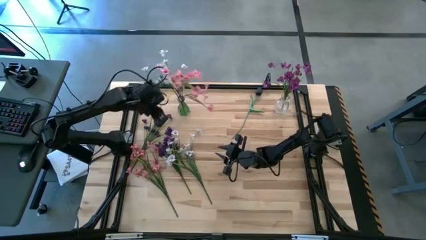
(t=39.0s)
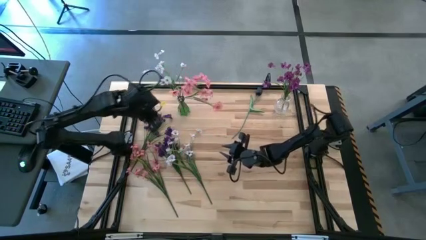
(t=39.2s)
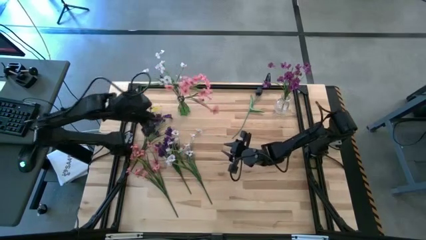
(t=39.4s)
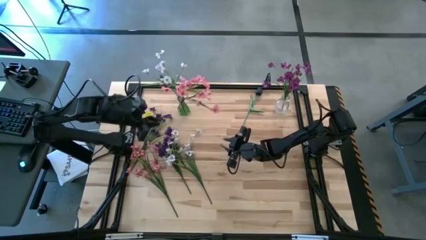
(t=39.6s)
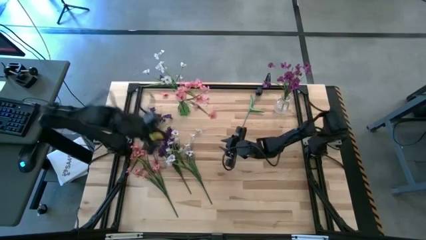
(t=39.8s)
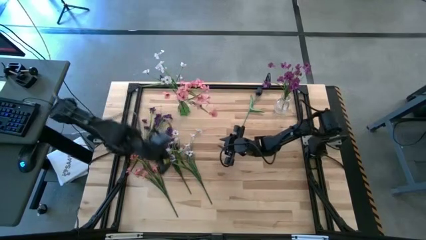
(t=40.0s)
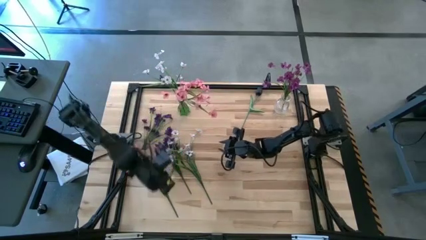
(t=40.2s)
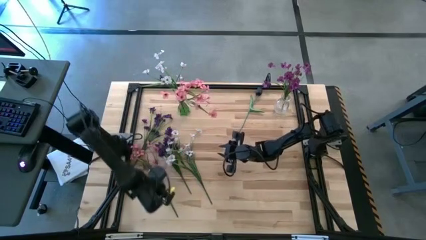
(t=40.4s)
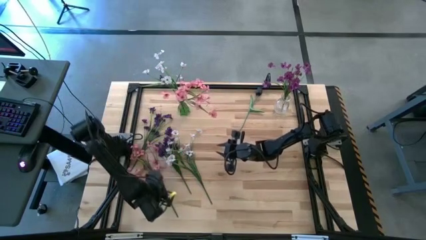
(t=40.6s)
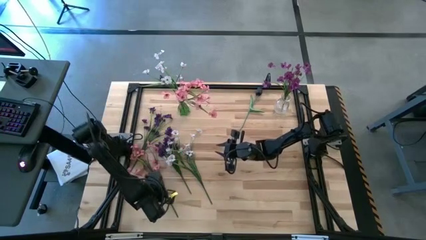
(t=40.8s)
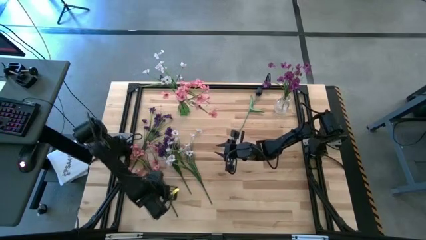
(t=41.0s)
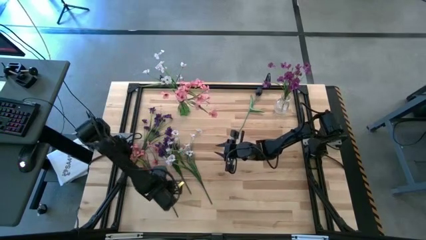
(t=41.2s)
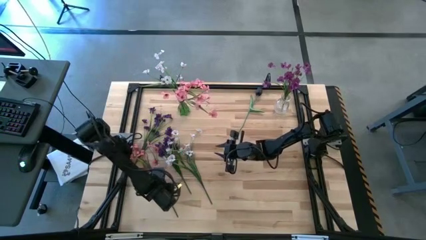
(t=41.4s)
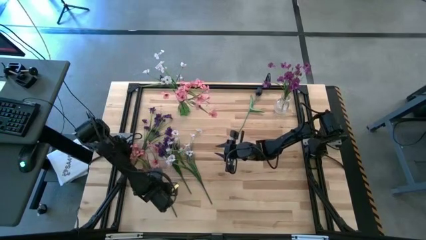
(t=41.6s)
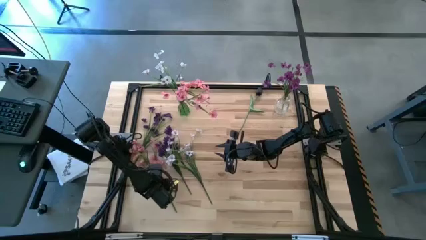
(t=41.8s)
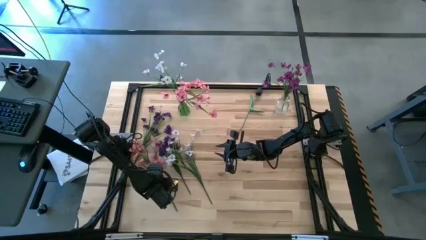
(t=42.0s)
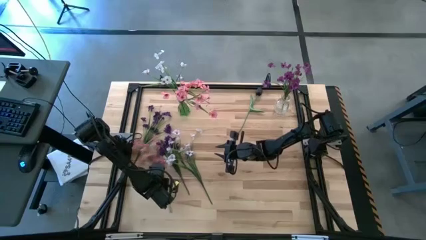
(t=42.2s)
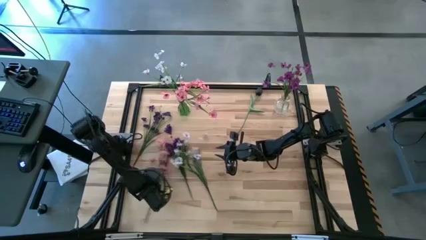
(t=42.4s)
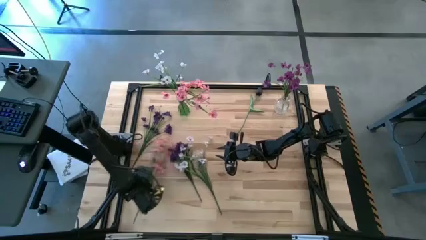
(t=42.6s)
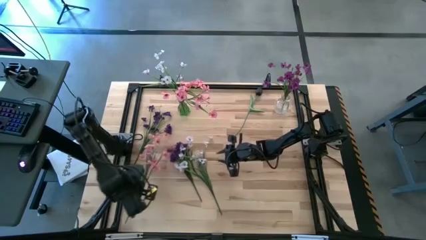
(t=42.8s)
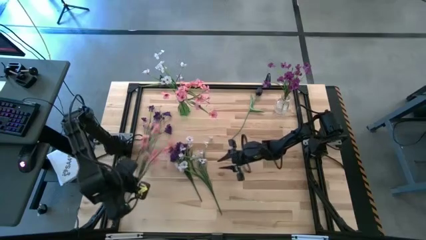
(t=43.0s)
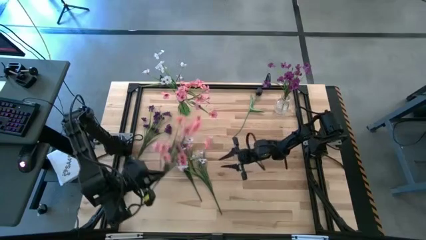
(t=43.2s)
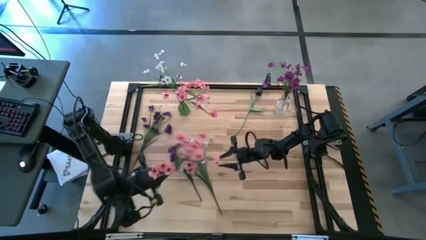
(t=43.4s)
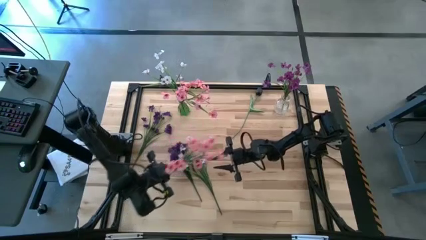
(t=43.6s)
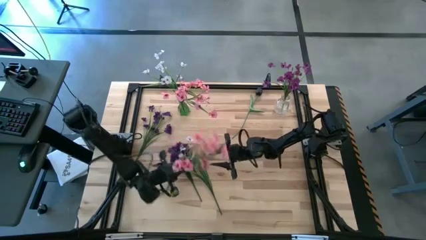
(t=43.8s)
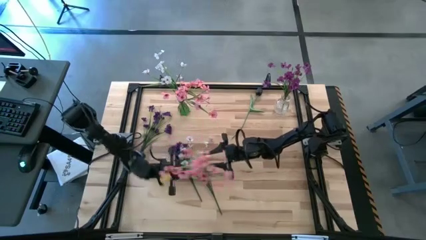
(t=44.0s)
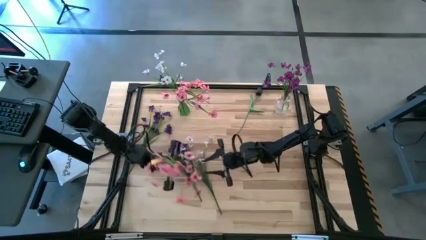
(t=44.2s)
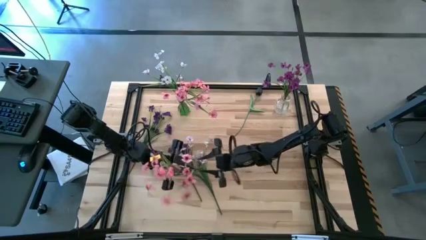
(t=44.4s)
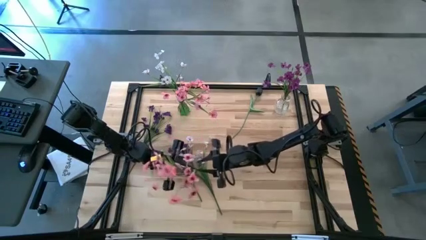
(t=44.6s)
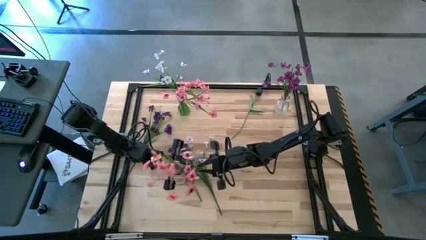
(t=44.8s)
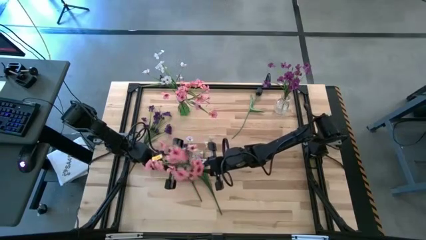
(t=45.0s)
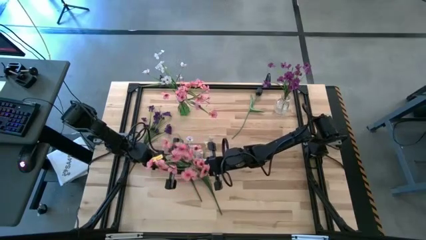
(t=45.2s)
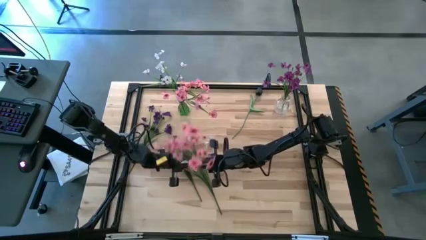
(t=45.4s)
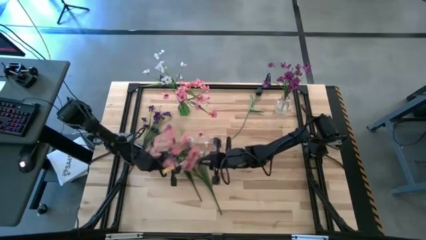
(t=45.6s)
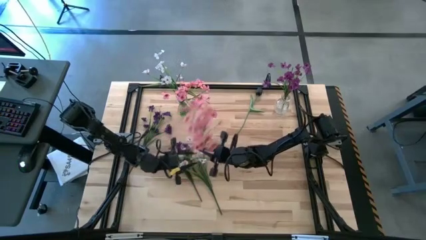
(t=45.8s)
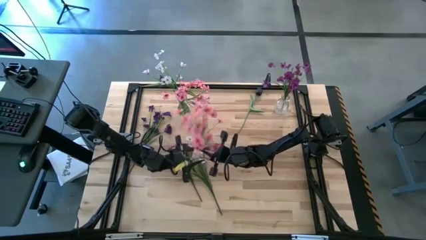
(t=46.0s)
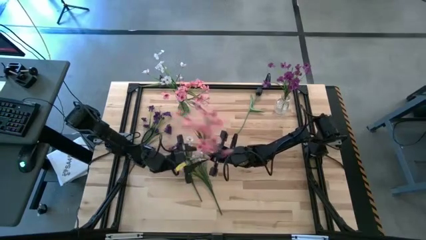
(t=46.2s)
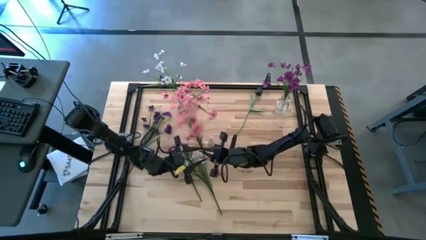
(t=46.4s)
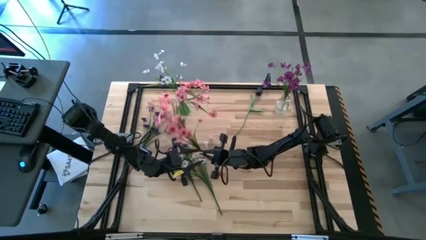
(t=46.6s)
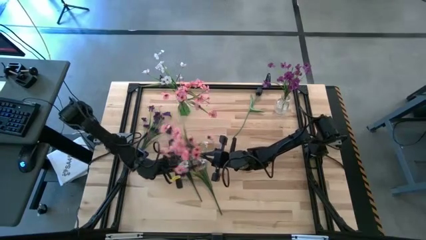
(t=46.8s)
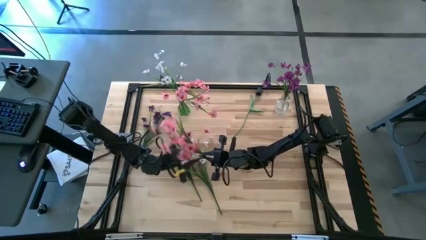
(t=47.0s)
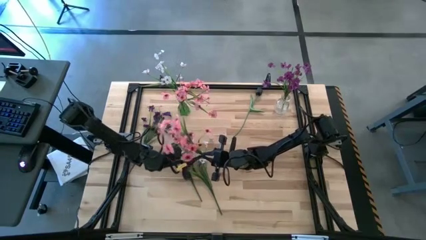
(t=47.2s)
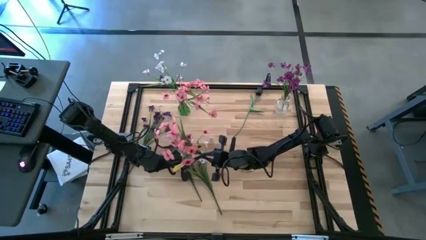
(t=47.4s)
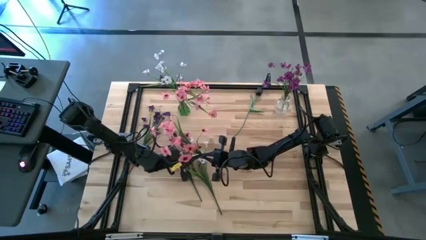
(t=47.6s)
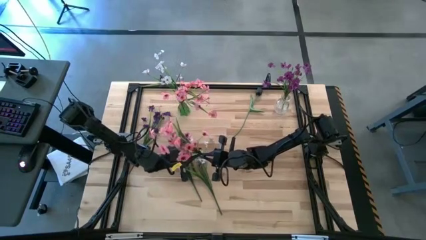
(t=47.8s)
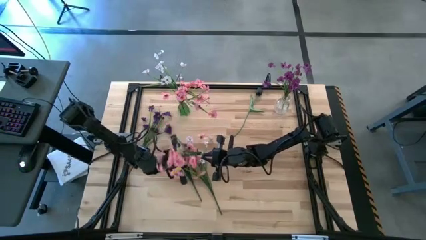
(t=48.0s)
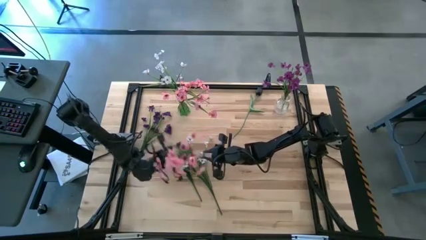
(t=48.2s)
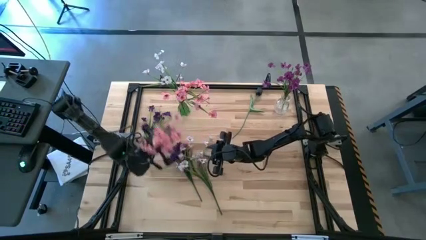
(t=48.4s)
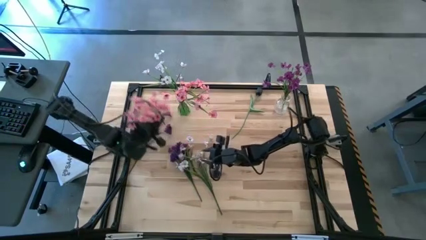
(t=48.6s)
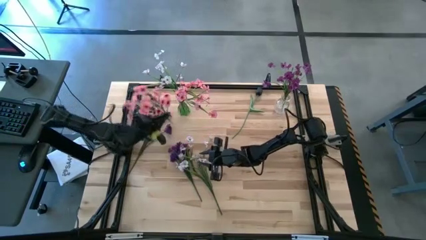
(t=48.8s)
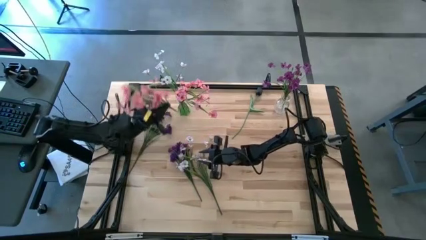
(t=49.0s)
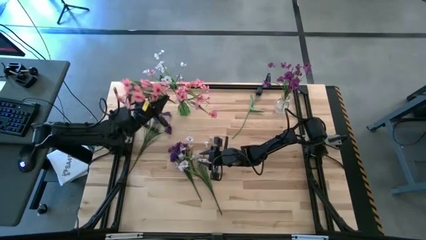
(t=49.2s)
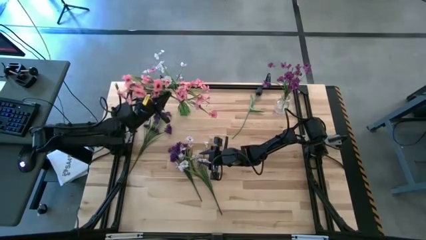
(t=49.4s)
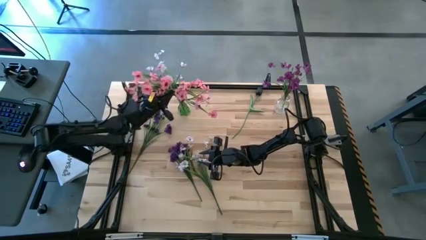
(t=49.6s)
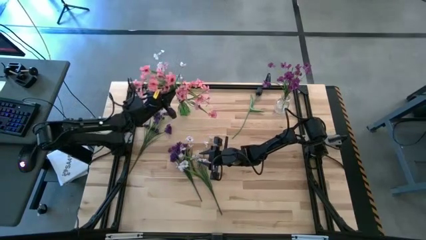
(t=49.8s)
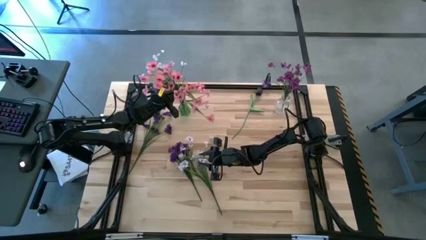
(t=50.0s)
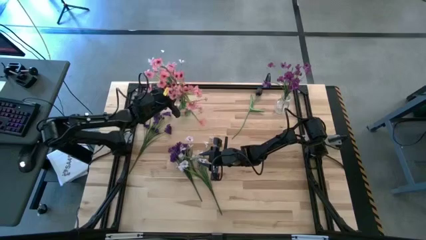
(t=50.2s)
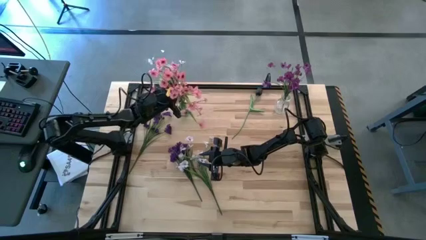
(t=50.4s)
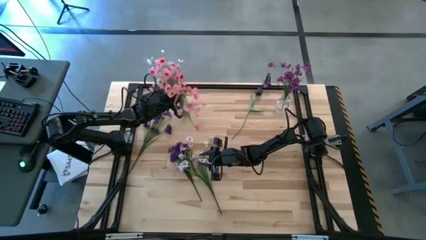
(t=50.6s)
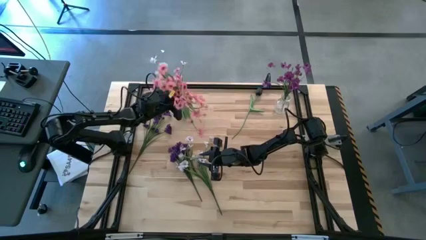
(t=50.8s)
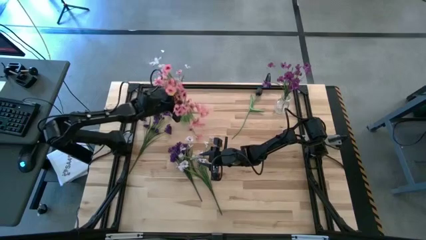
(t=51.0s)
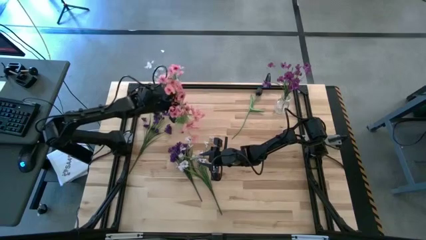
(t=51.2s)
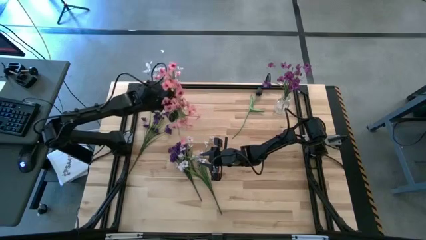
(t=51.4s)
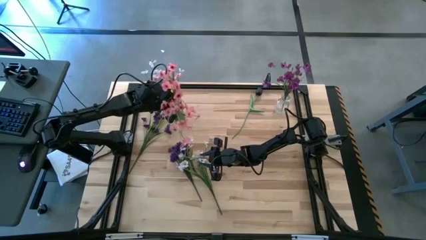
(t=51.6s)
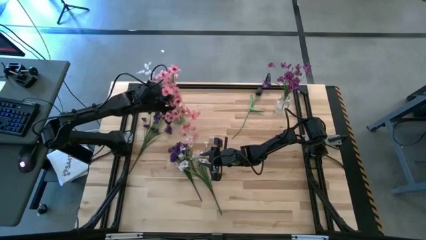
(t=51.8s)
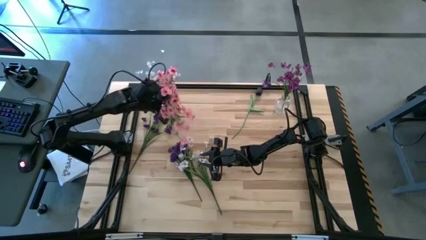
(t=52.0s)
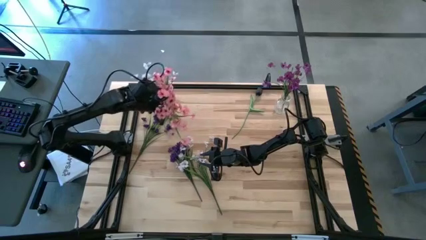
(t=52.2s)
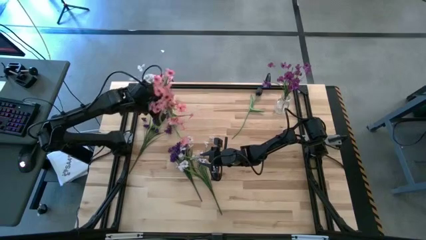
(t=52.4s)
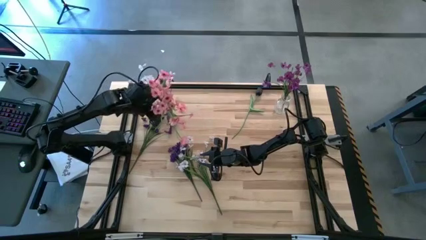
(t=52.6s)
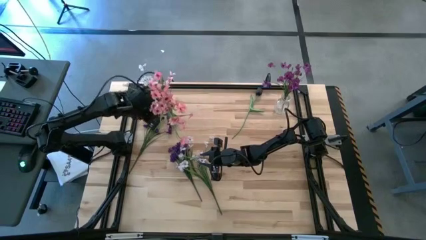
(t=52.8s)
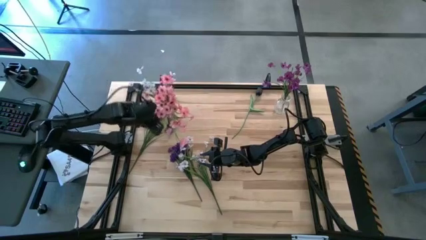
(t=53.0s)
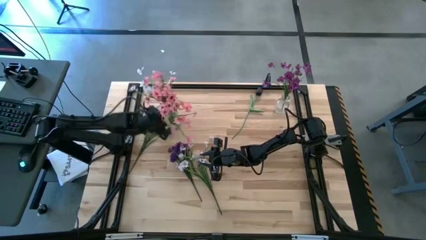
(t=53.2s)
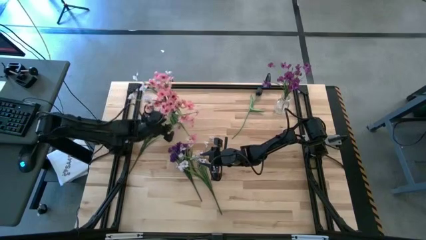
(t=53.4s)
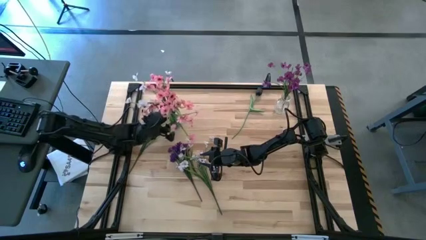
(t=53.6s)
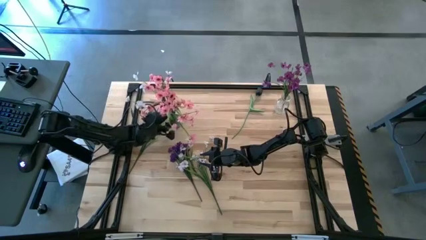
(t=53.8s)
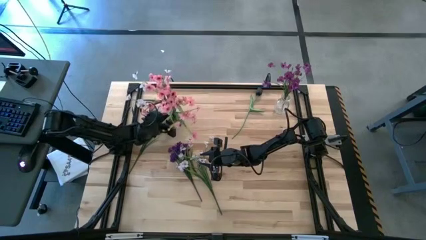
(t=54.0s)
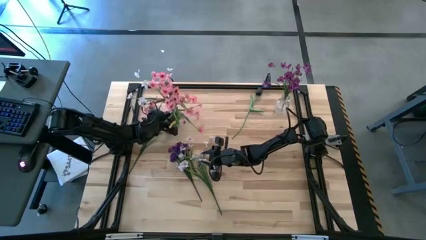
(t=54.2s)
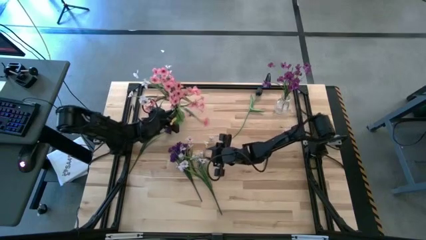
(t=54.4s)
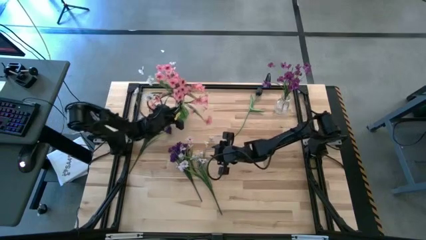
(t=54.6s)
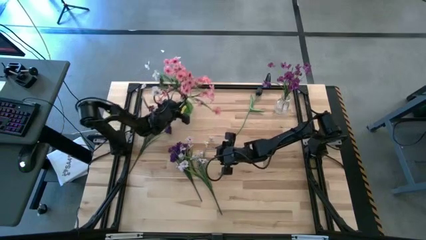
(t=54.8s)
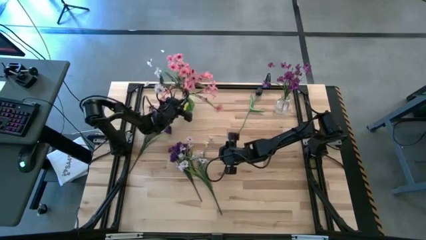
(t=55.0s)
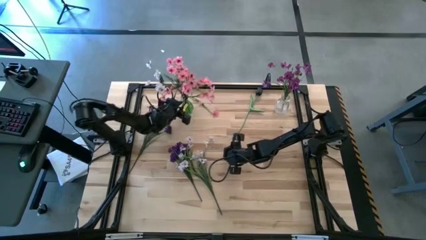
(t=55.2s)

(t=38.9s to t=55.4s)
Task: Sort flowers into vase by color
Put the pink flowers into the green vase
